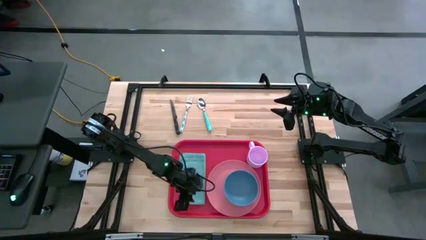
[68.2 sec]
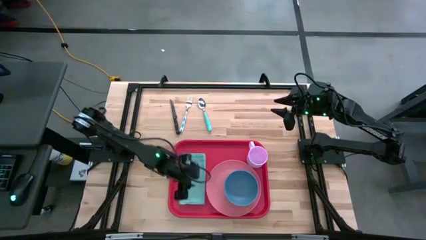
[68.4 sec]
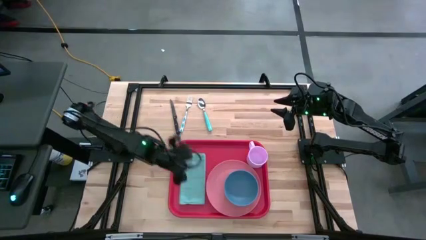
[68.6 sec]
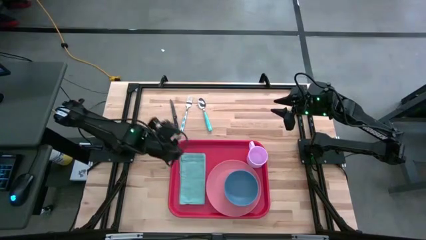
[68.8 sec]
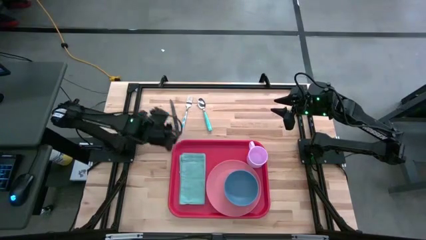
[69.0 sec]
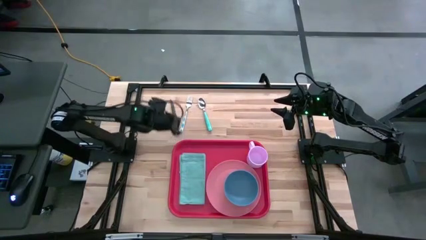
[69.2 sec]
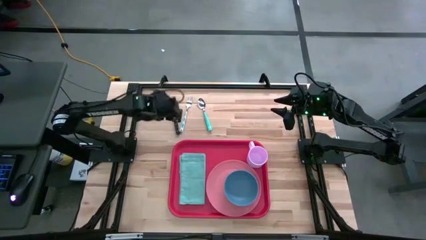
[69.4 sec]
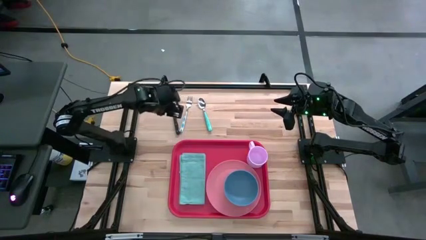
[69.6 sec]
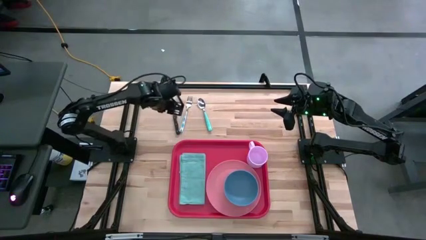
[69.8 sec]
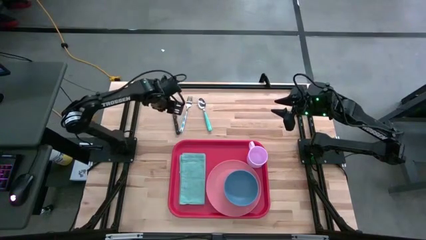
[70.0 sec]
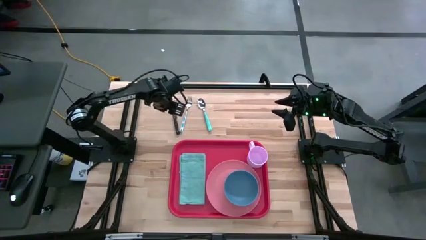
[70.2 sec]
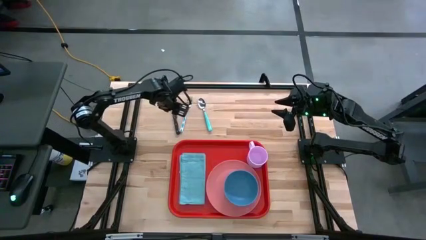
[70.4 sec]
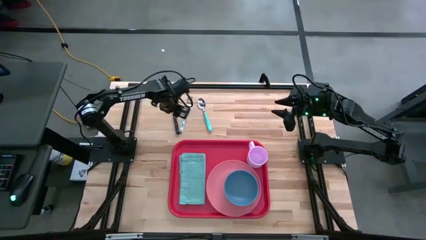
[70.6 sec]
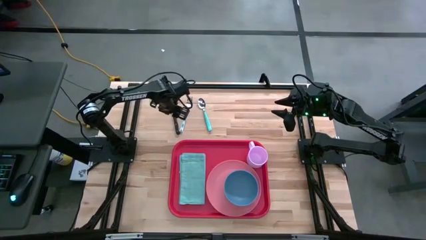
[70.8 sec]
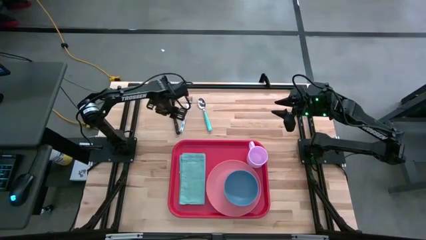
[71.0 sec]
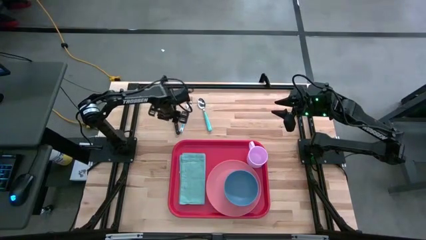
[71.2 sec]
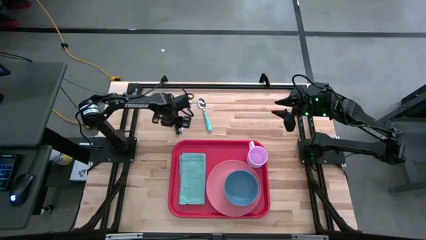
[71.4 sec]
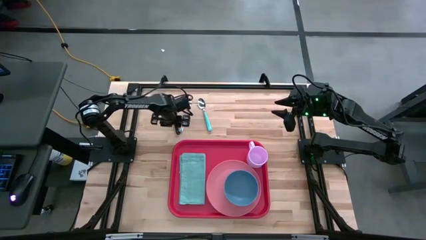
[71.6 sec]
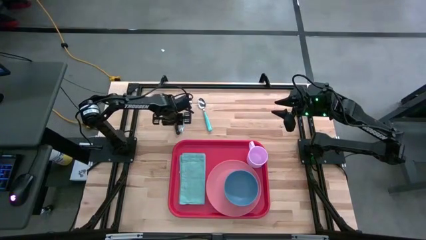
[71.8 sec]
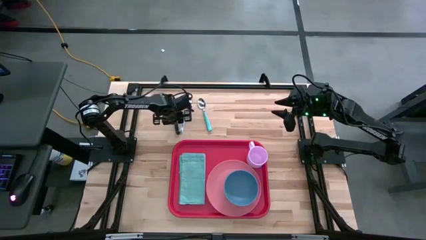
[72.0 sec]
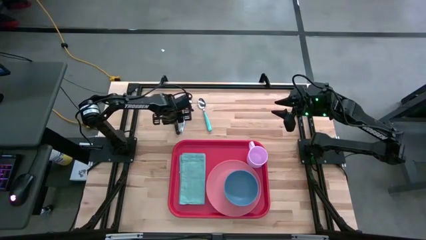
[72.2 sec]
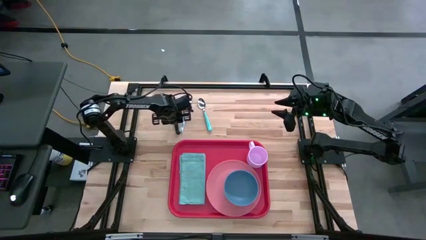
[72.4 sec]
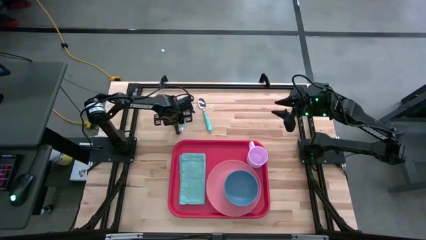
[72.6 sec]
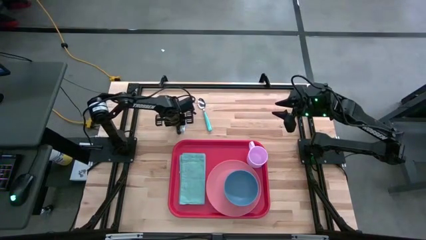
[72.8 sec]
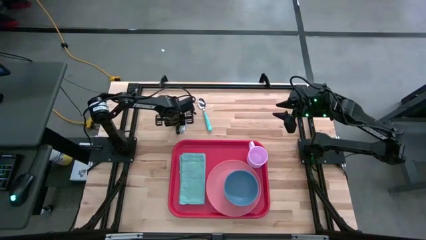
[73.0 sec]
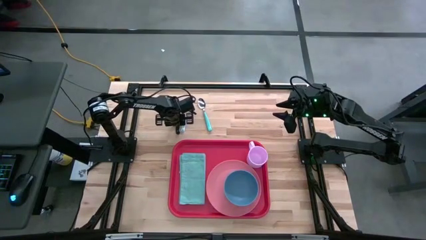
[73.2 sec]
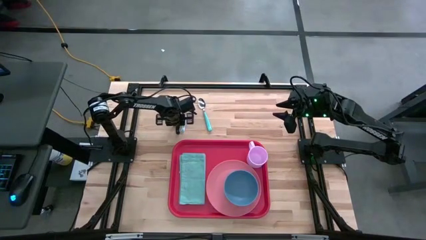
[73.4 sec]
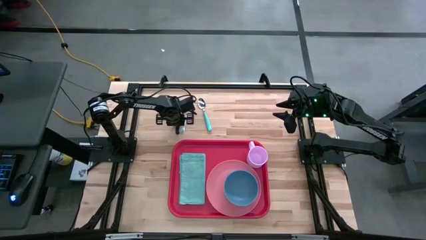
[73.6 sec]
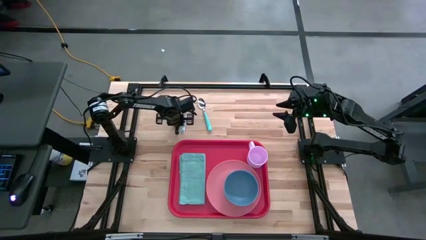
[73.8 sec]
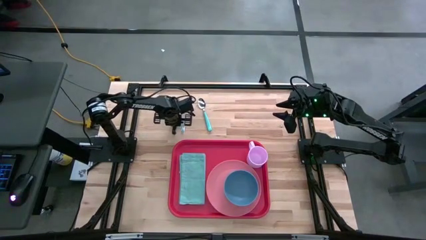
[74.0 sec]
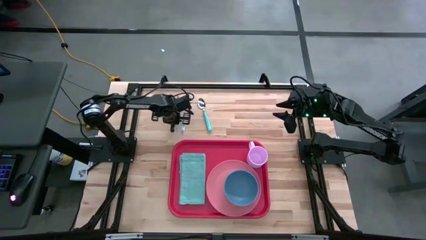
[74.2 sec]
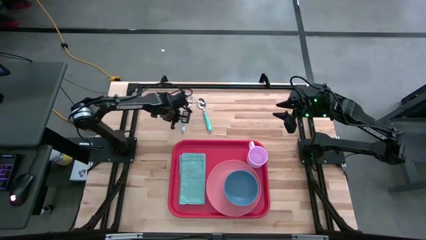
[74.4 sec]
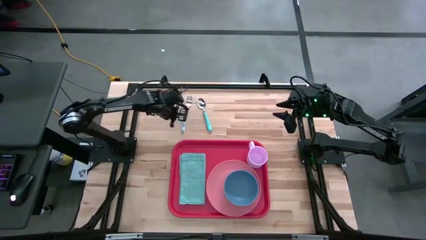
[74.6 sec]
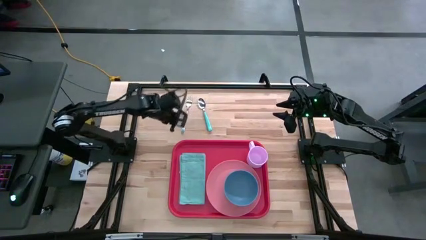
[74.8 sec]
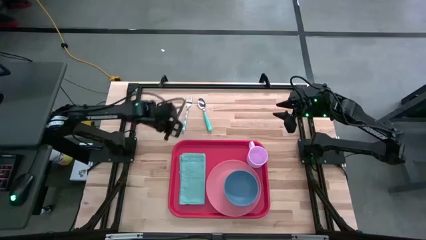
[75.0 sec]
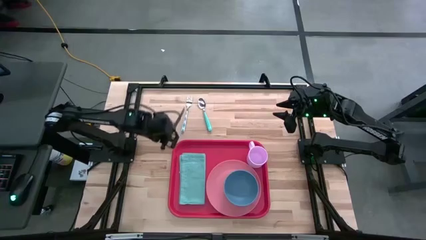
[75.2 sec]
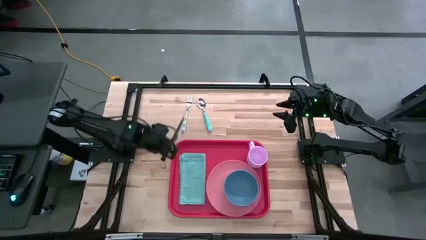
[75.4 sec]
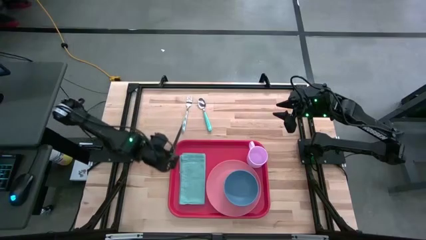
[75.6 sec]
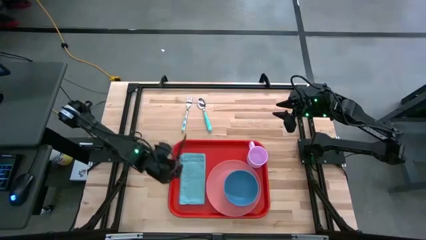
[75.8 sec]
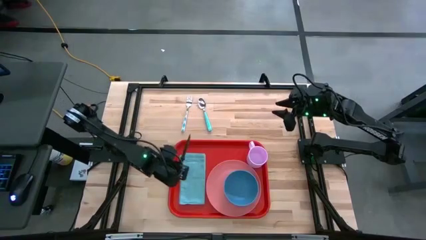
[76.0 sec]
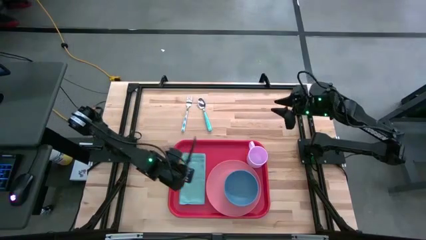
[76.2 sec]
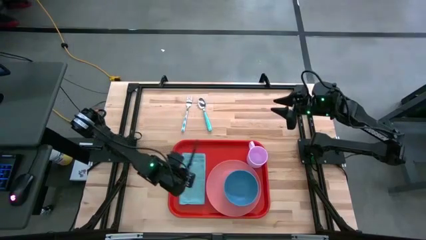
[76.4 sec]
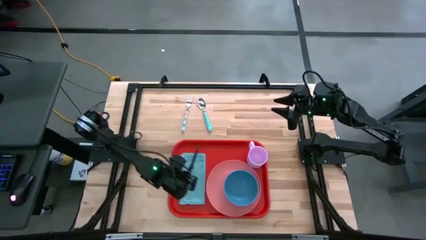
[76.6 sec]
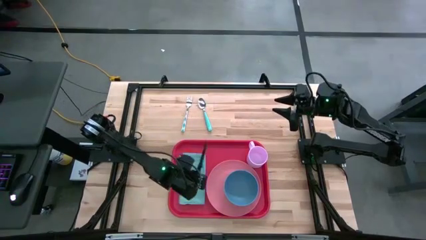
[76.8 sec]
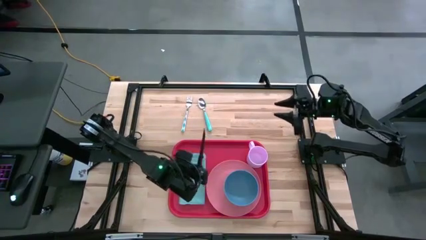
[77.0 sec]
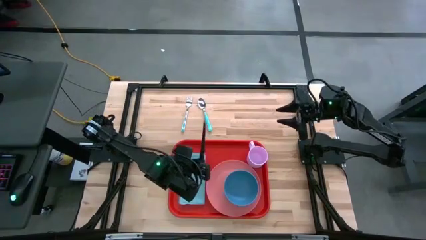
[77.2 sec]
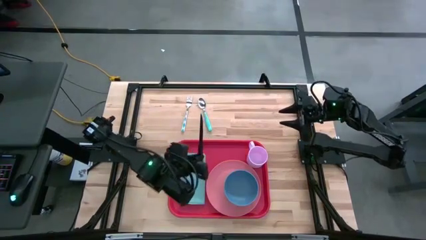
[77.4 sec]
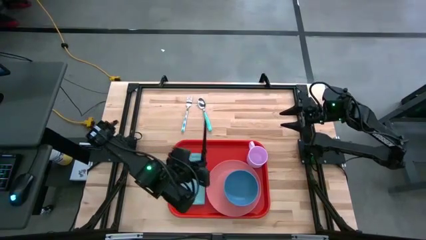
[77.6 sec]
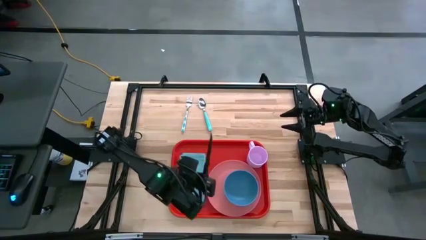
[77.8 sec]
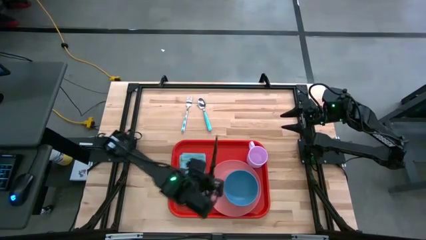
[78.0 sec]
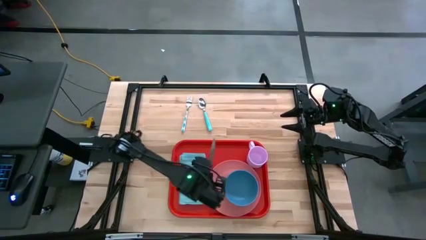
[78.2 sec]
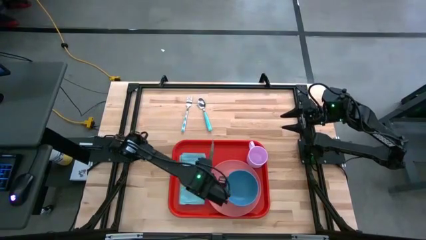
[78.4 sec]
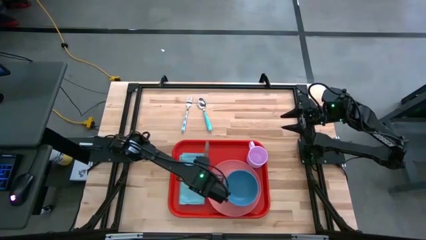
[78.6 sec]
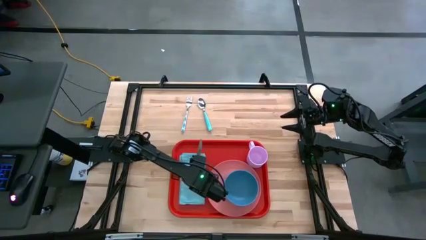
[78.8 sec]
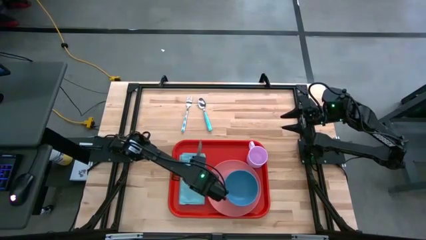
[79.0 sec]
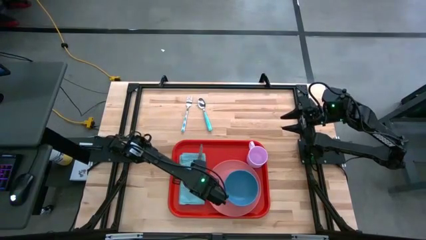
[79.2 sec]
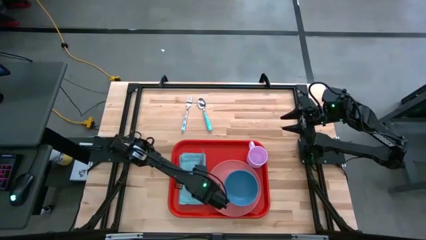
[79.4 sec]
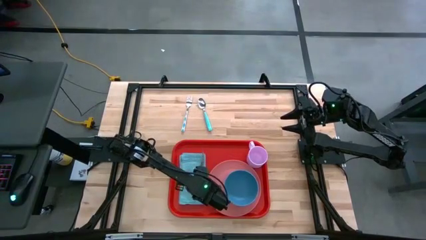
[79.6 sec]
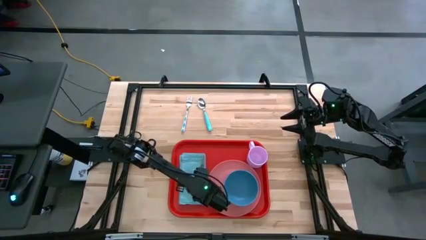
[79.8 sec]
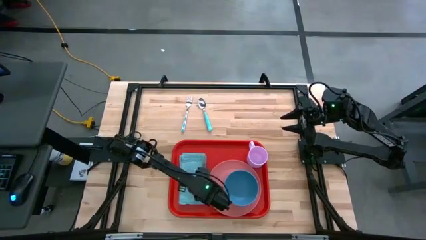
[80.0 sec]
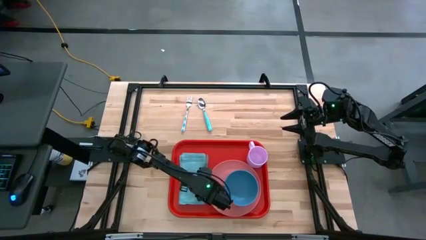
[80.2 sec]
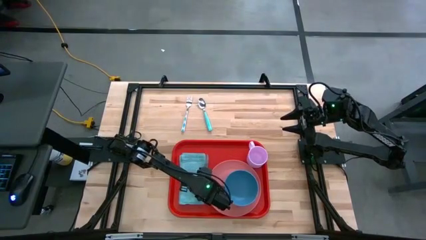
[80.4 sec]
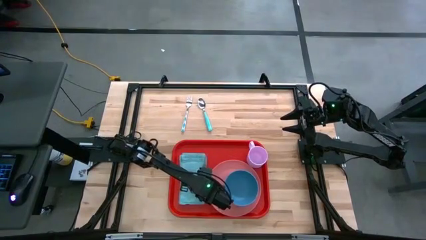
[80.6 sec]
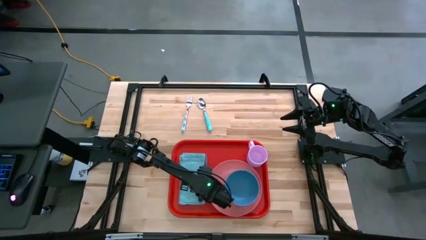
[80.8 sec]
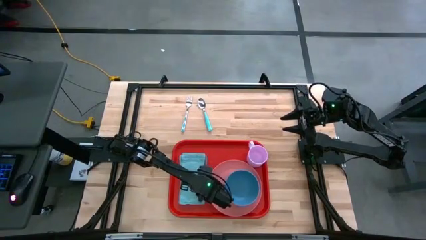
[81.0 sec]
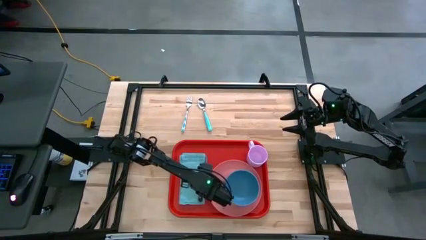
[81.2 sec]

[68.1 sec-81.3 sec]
Task: Set up tray
Put the black knife on top of the napkin

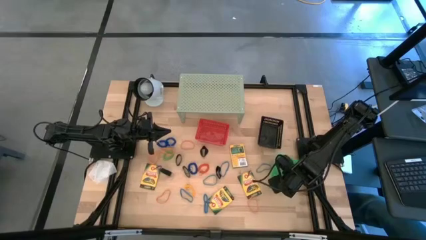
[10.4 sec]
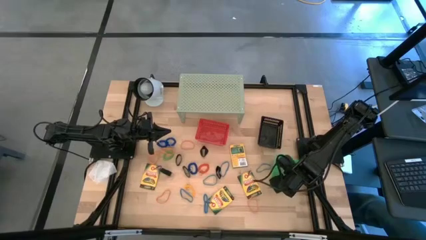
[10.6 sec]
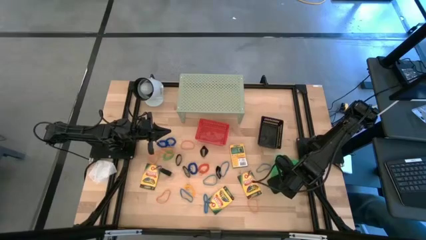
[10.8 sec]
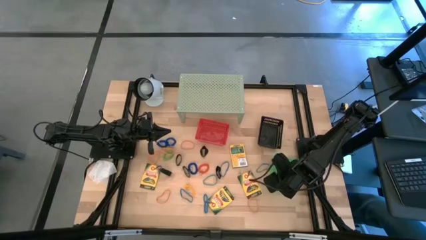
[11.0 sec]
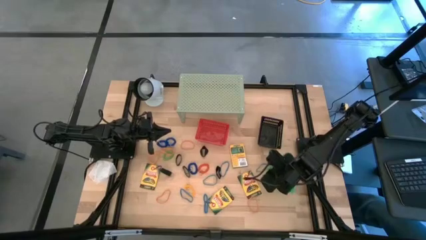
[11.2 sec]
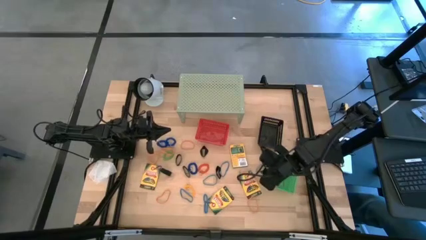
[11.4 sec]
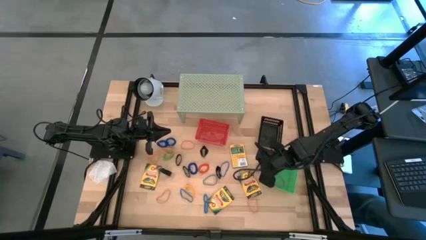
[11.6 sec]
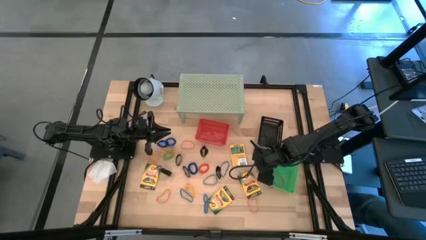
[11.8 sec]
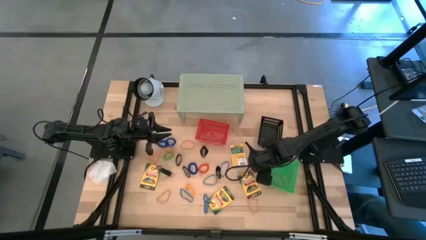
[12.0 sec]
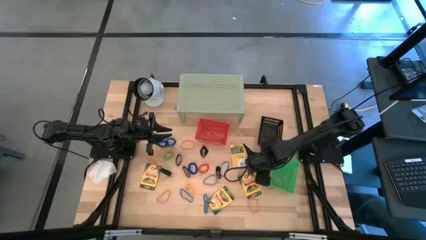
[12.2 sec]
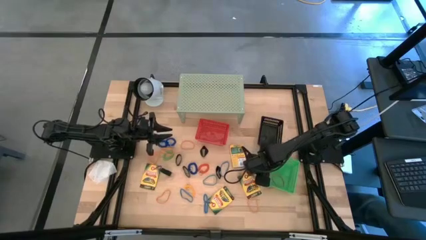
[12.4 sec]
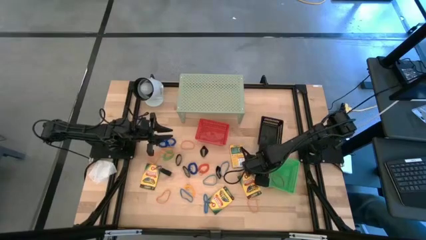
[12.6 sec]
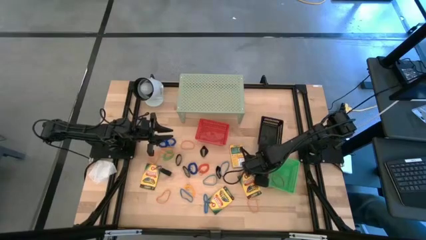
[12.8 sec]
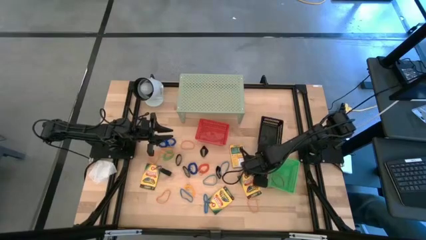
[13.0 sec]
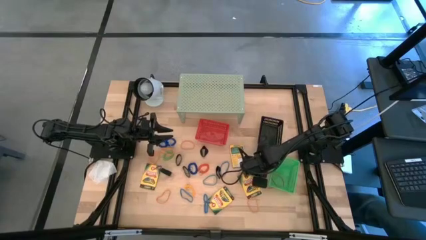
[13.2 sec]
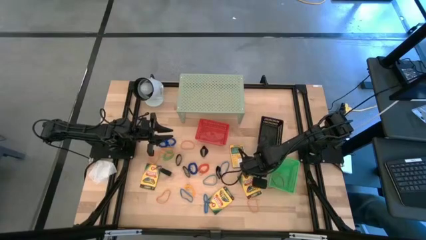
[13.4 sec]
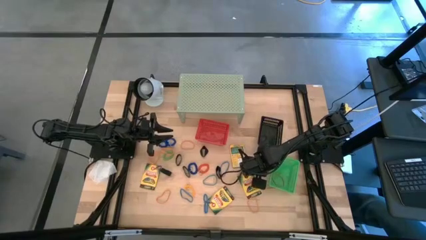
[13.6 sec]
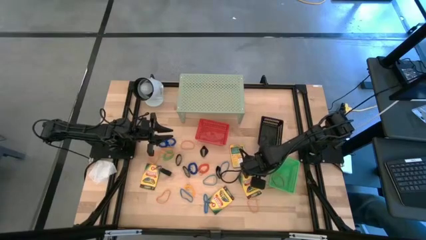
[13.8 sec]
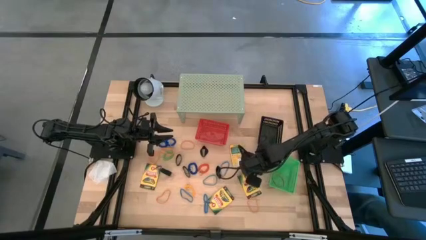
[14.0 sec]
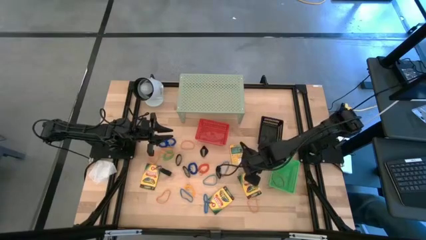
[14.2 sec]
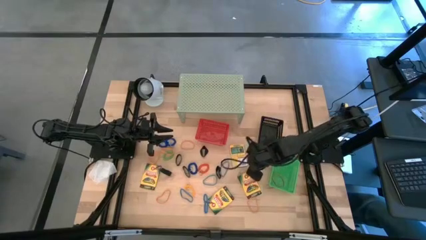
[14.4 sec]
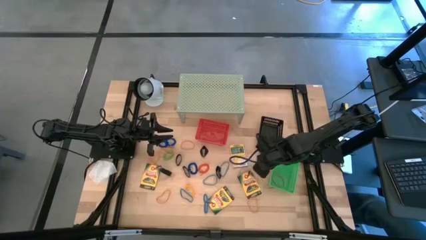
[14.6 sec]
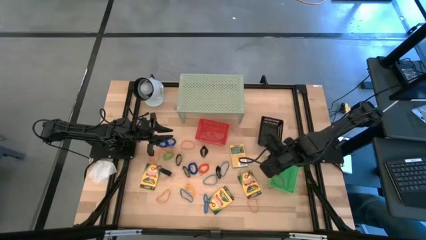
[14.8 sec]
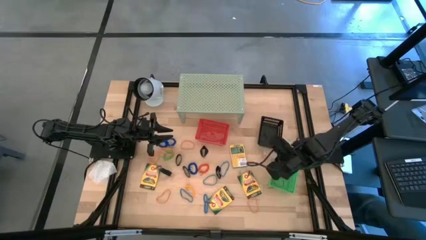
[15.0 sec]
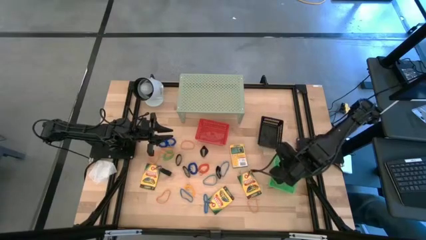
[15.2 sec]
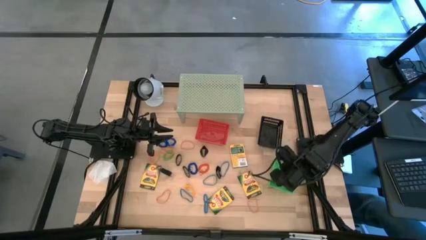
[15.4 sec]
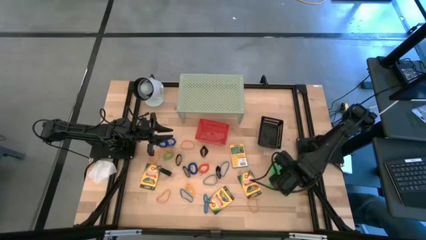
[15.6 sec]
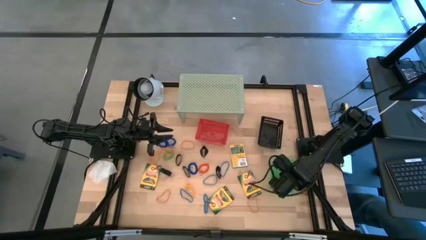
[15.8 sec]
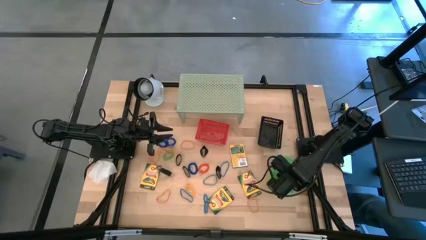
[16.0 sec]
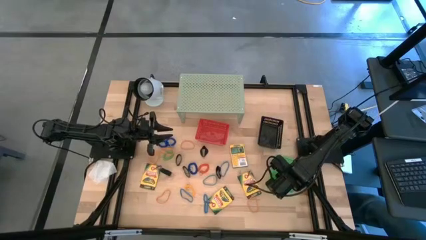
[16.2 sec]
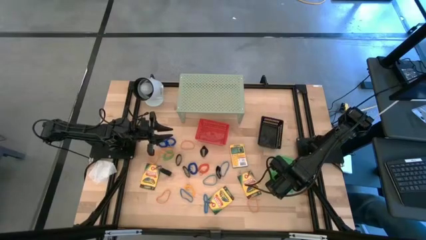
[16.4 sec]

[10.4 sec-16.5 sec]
Task: Pick & Place Office Desk Supplies
Put the blue rubber band into the green bin
